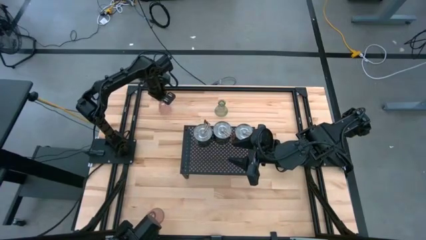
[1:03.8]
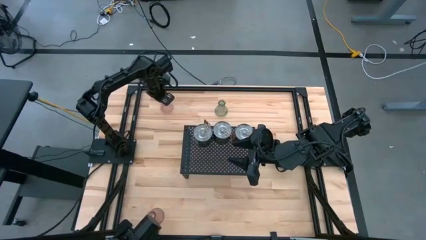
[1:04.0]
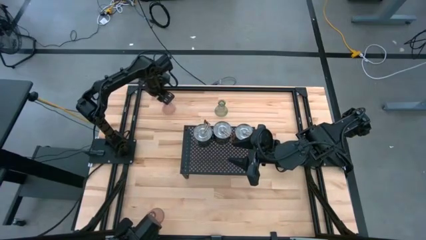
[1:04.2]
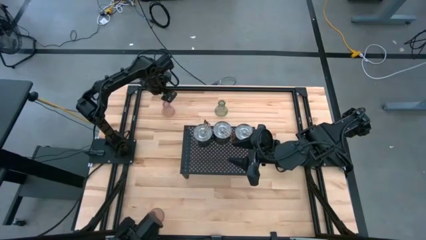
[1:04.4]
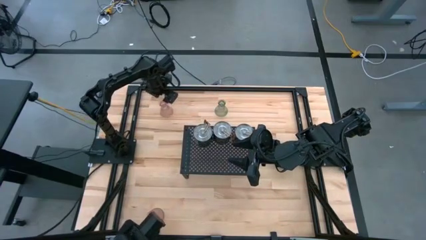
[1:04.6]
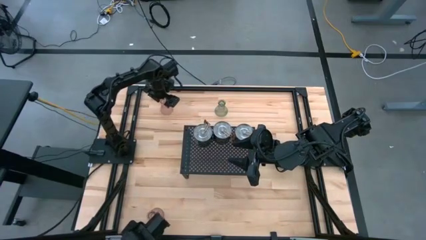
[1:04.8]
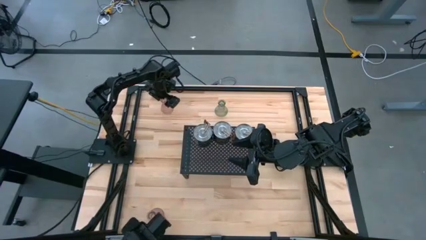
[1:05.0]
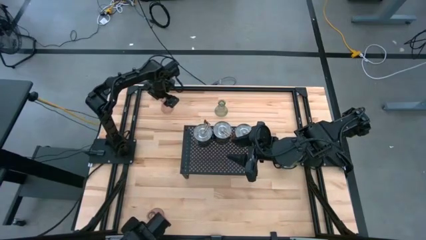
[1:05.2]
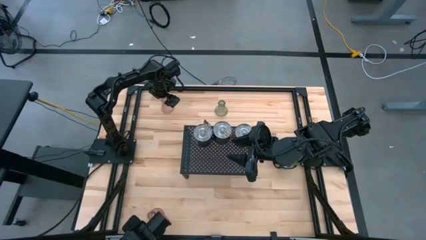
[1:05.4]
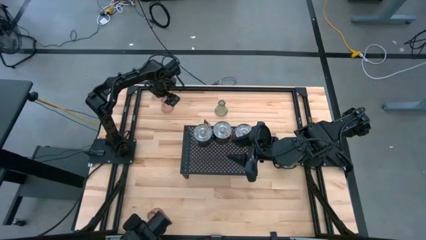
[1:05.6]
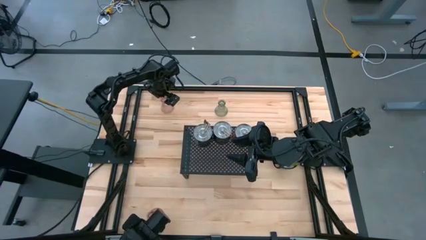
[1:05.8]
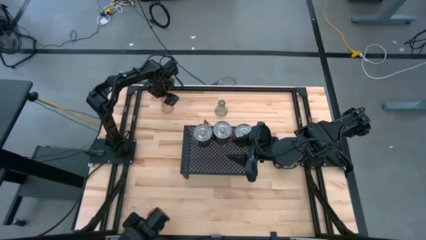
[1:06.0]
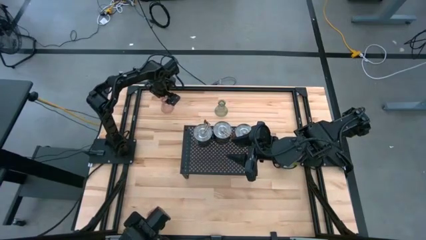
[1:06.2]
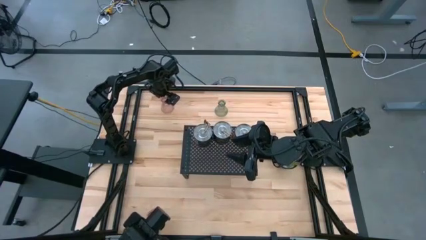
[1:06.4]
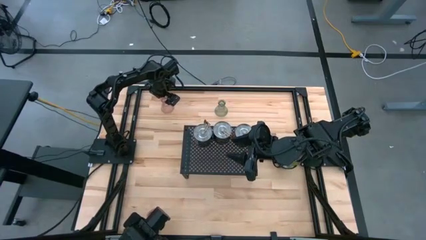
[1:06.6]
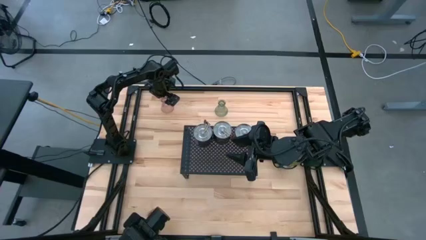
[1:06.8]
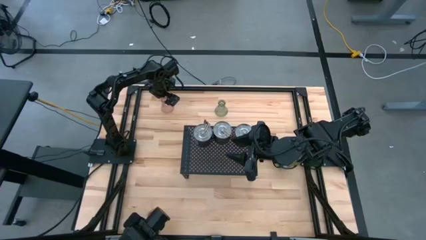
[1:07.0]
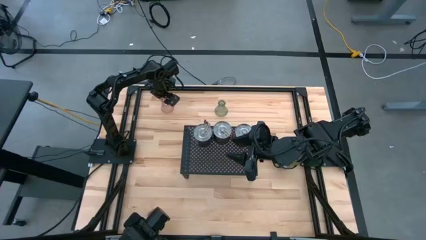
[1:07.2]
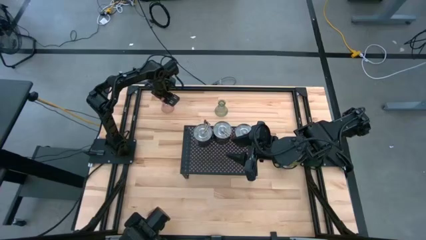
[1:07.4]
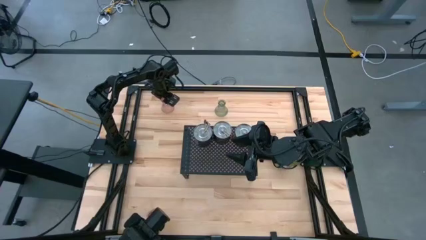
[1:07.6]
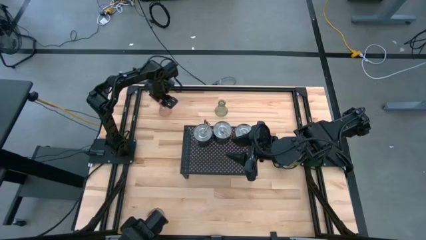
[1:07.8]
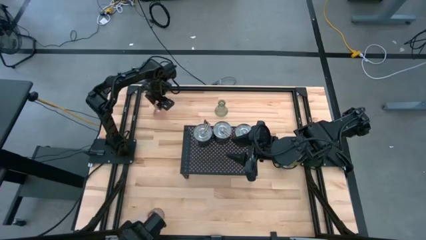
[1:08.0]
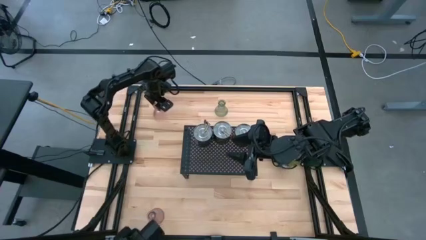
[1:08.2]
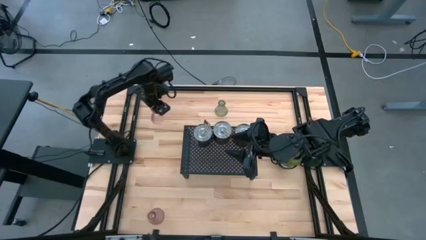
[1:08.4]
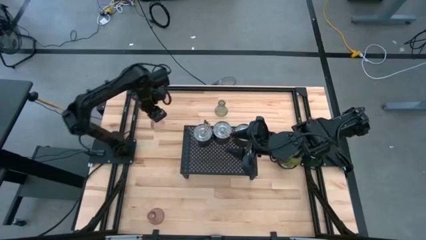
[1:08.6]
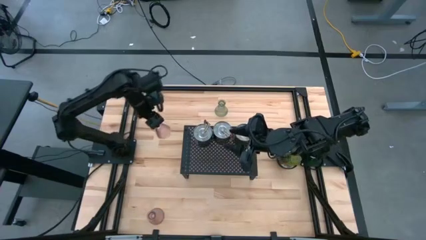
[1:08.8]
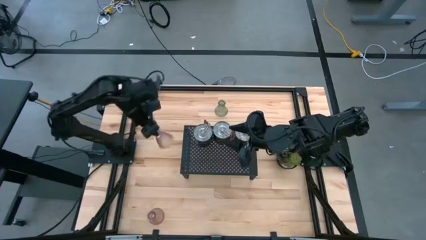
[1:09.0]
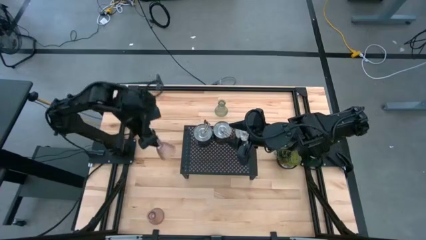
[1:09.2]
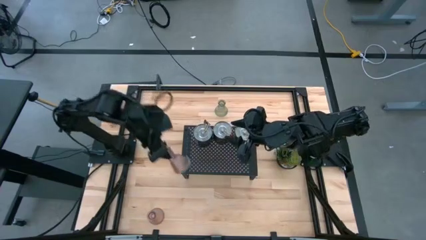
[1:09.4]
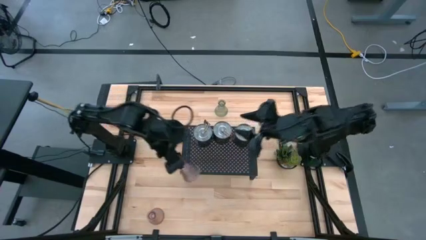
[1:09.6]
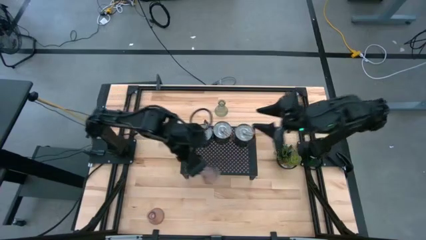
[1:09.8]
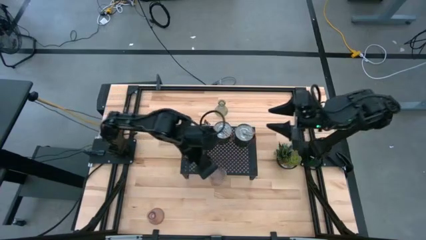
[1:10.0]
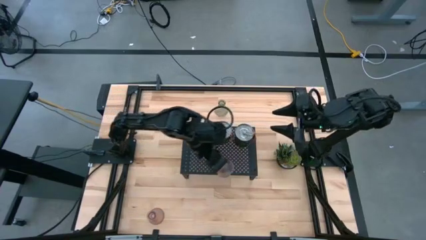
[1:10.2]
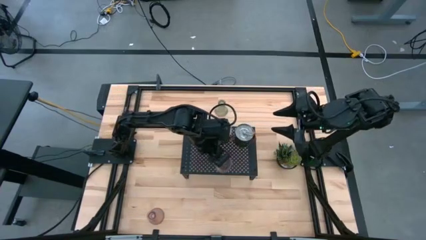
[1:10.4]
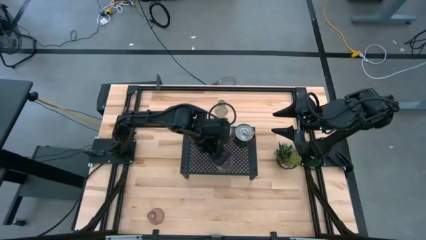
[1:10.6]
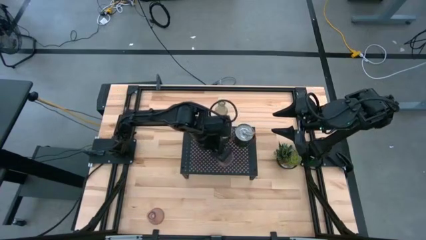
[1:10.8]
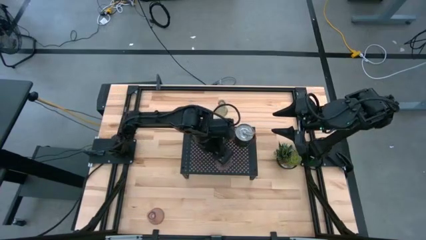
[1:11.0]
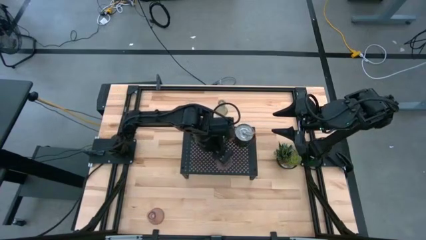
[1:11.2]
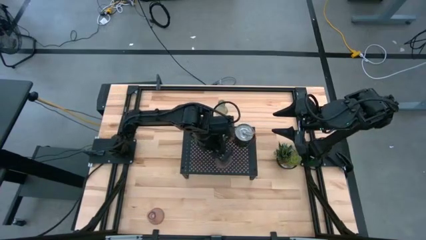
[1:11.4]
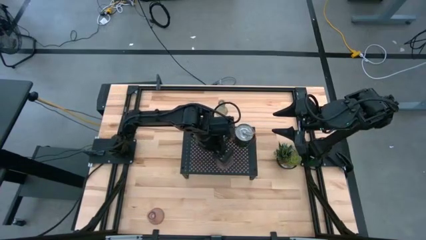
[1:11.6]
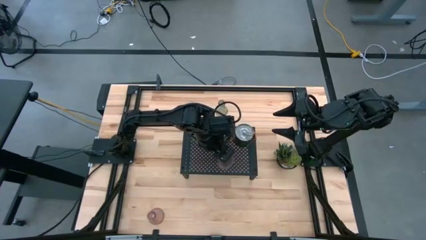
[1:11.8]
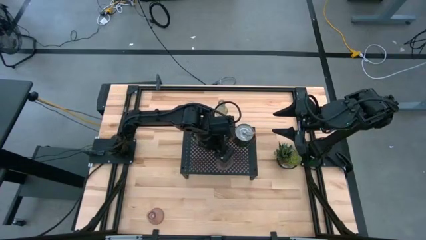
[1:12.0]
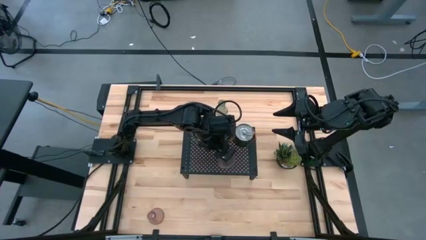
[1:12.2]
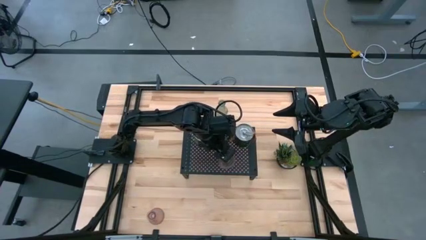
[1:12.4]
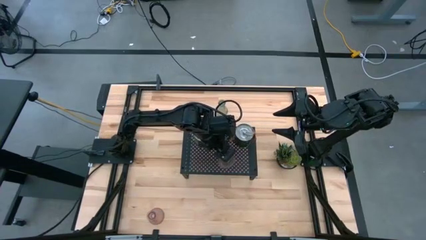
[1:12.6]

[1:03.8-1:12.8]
Task: Pick & Place candle stick holders
Put the top pink glass candle holder on the shelf

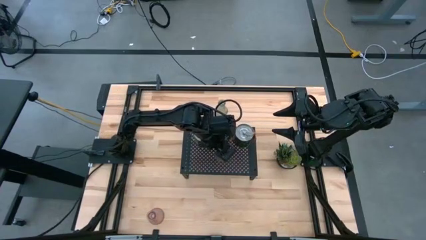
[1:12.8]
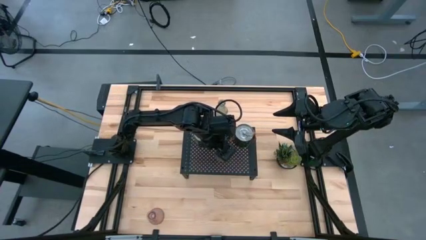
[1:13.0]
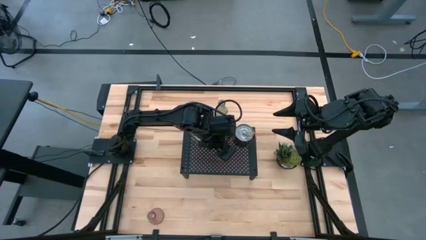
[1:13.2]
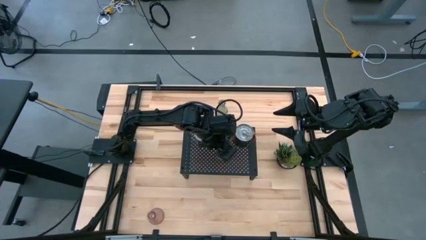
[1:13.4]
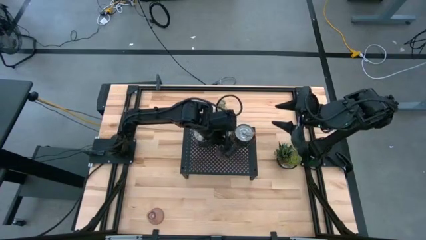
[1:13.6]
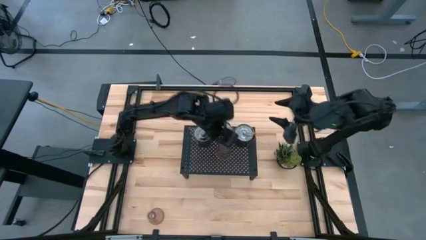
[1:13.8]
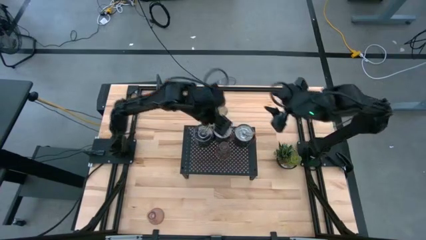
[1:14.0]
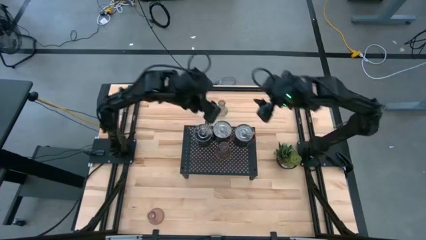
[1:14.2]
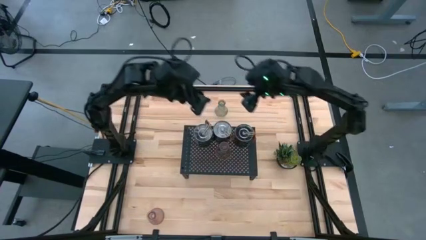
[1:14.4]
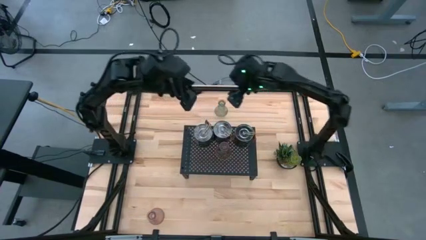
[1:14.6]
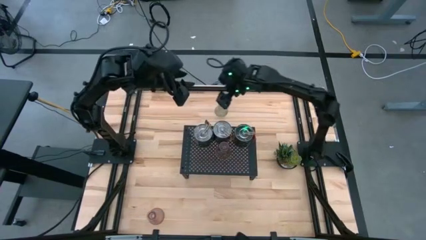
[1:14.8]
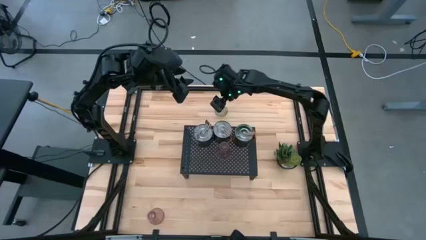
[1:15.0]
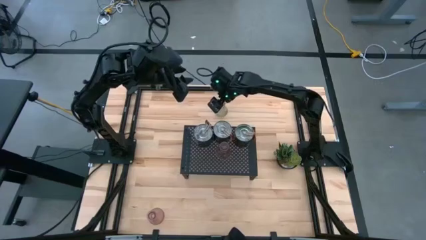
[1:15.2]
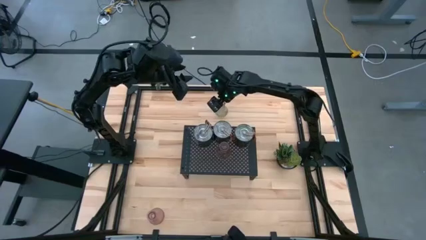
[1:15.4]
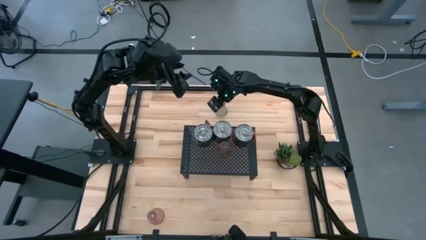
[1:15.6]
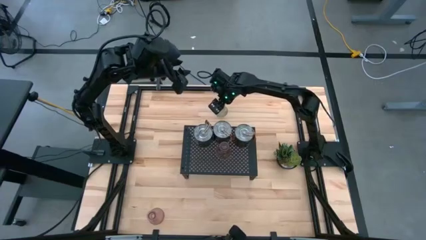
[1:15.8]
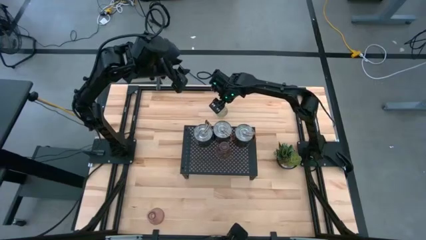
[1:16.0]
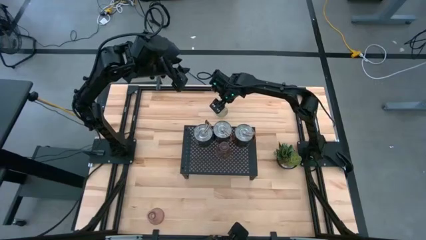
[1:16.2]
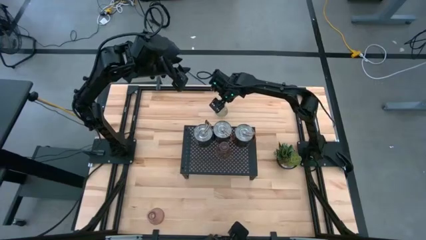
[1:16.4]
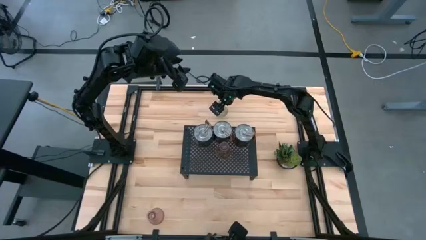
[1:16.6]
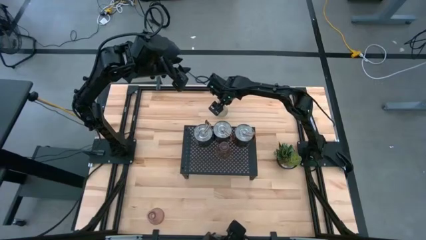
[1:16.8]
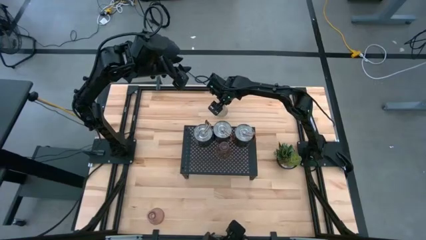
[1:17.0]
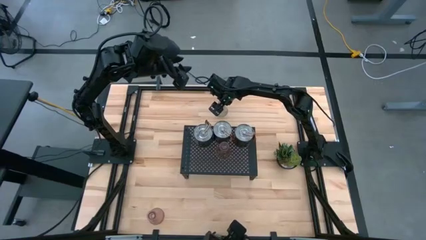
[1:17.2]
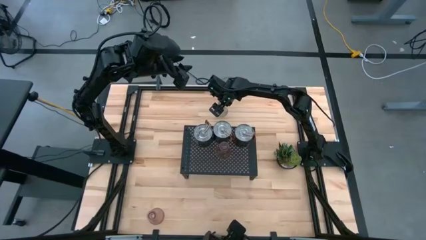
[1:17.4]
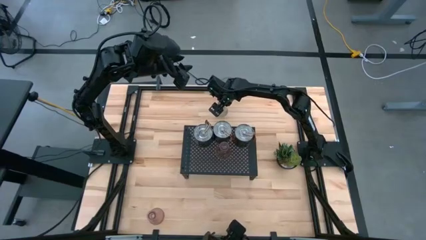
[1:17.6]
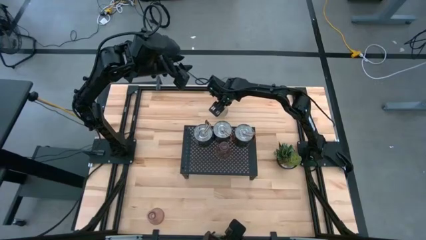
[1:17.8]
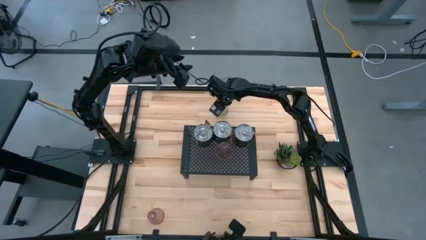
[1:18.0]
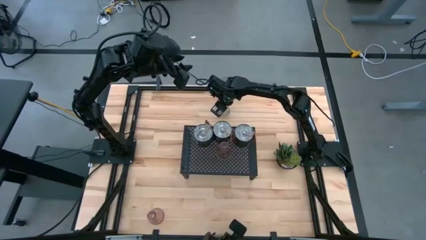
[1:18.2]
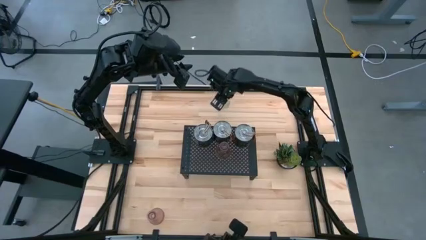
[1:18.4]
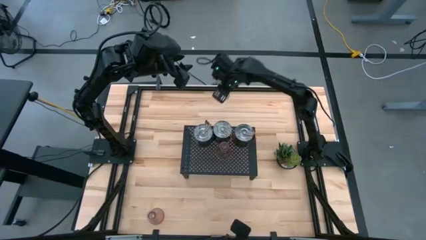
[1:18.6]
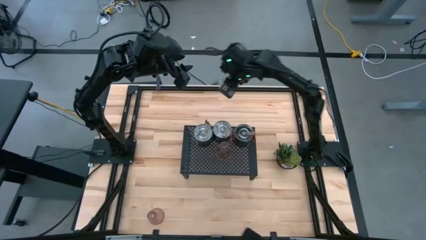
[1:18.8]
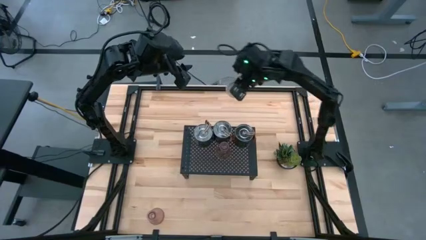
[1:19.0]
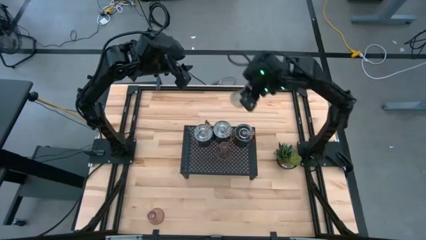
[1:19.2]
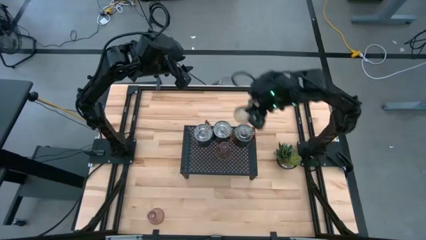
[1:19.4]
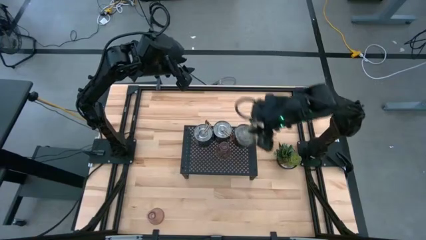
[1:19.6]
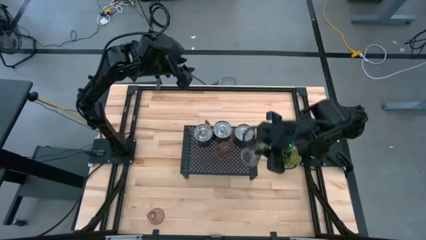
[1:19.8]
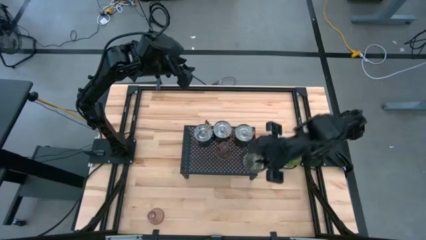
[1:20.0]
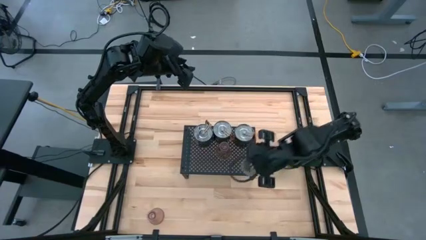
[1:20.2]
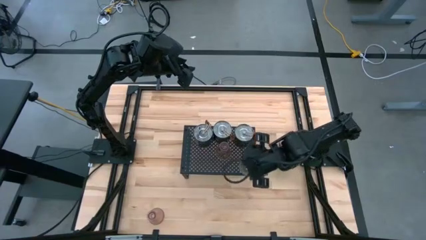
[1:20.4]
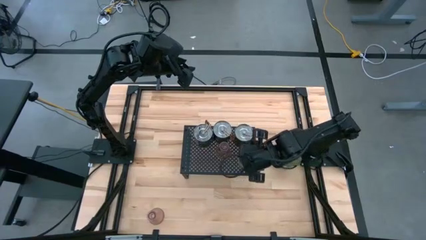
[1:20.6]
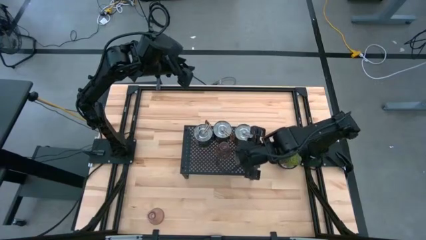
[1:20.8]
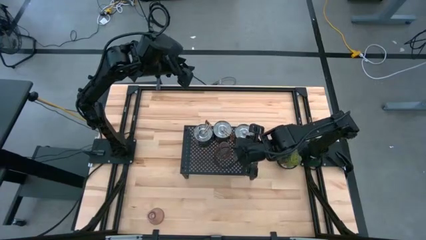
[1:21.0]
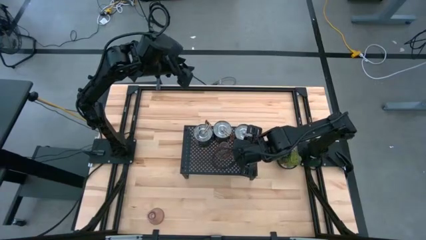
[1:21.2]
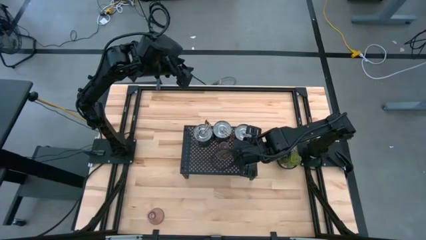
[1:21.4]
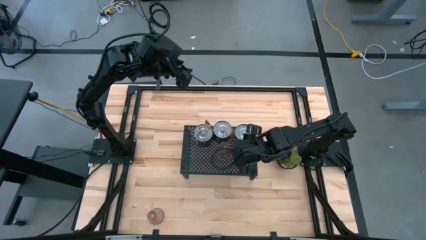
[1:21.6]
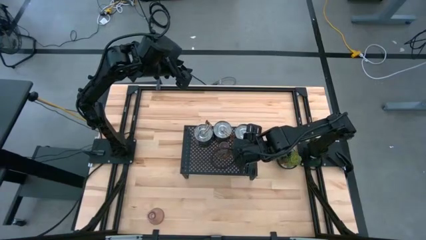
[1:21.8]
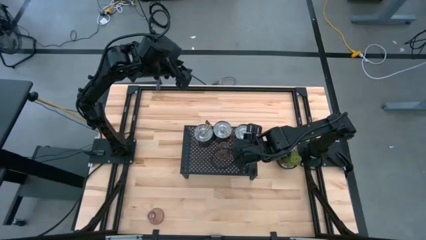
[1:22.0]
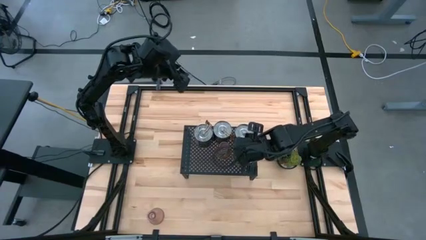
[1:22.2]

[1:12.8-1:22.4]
Put the green glass candle holder on the shelf aligned with the other glass candle holder
